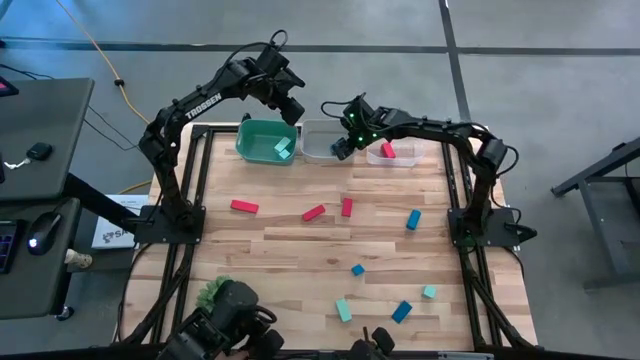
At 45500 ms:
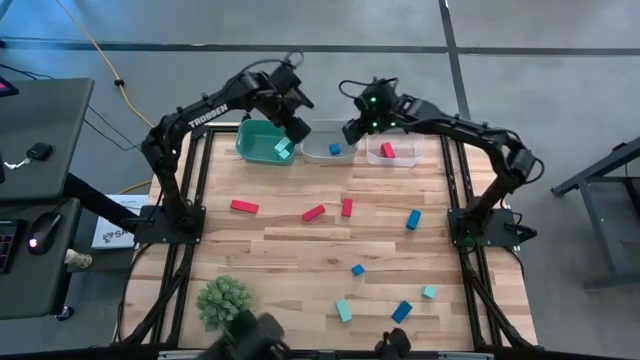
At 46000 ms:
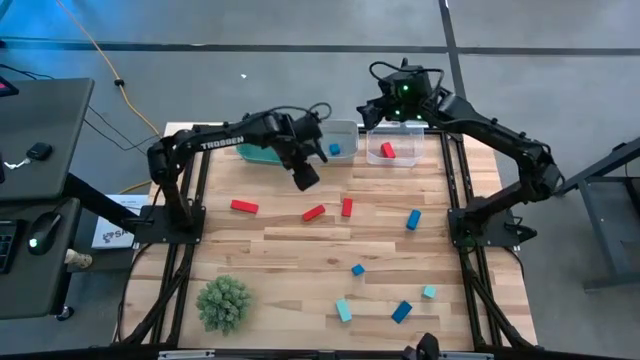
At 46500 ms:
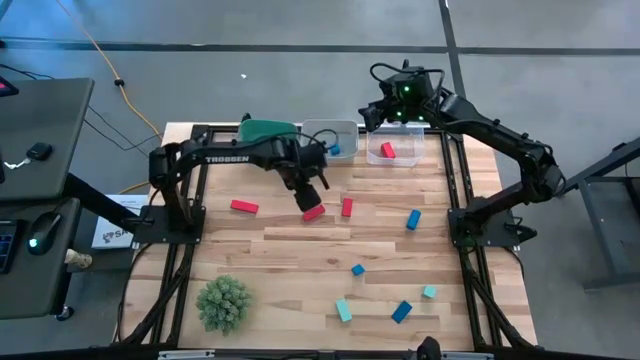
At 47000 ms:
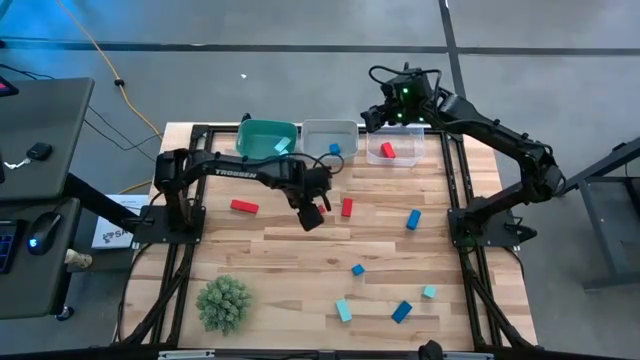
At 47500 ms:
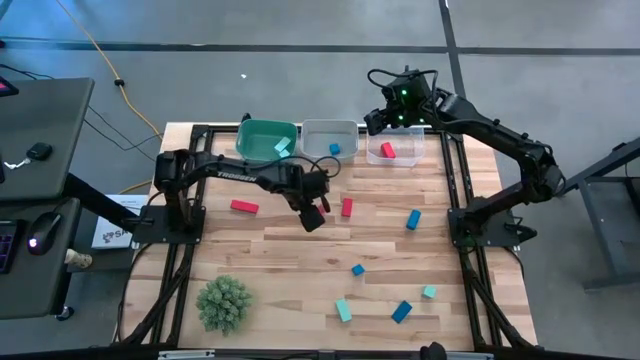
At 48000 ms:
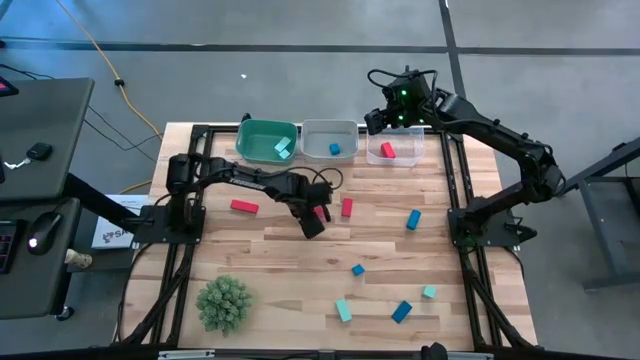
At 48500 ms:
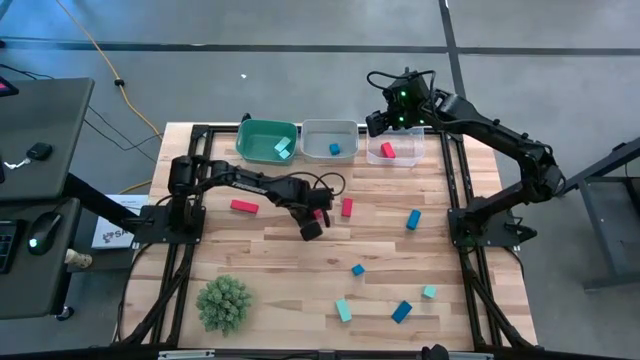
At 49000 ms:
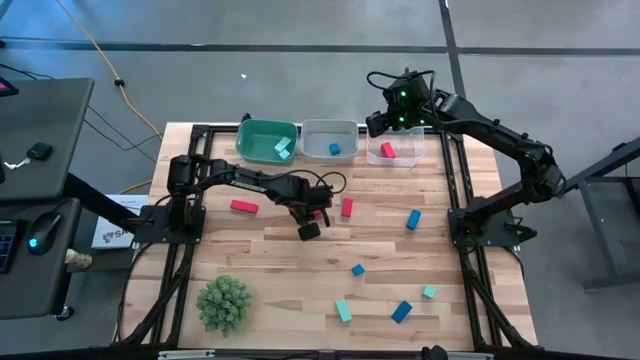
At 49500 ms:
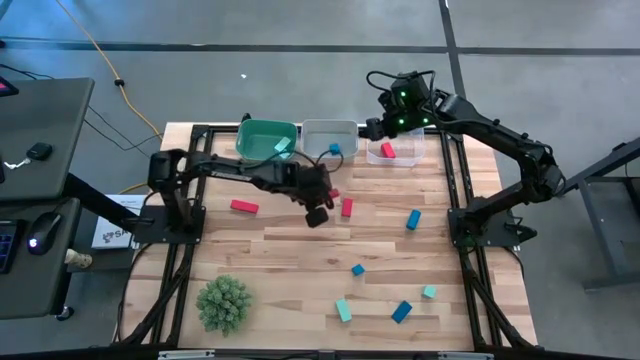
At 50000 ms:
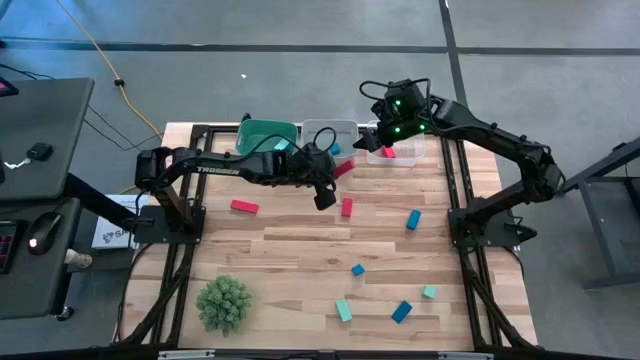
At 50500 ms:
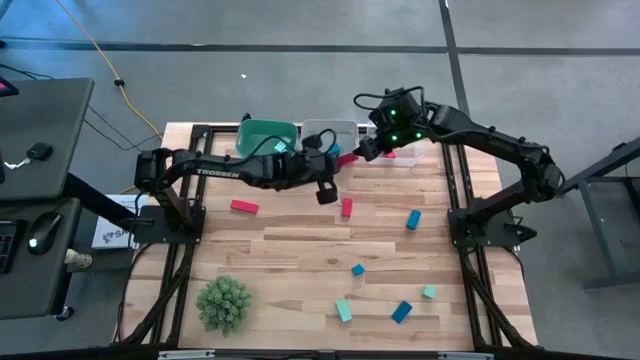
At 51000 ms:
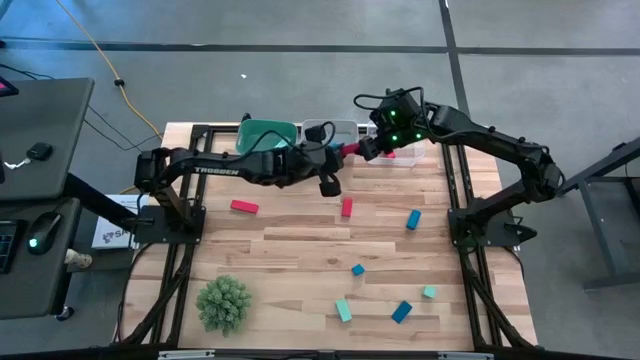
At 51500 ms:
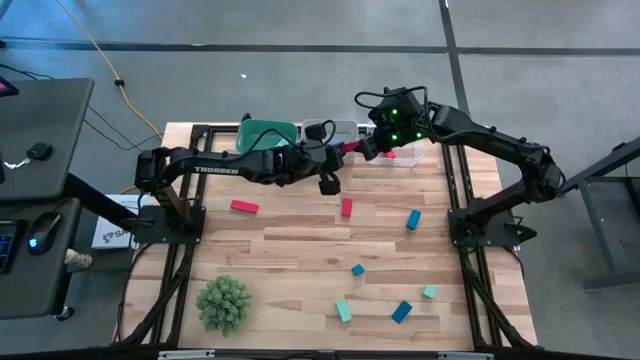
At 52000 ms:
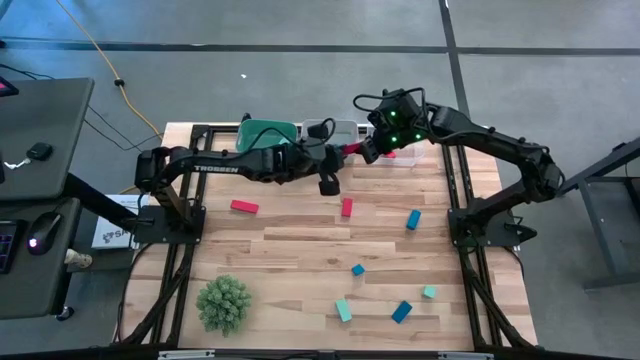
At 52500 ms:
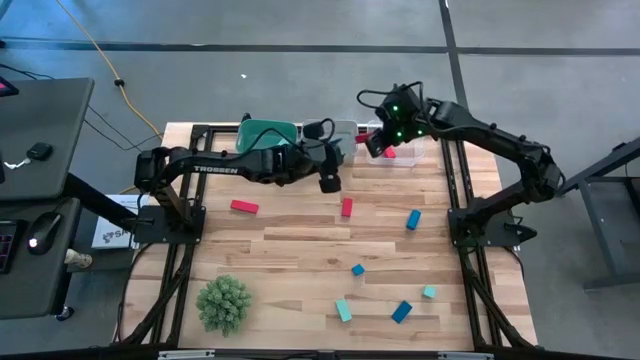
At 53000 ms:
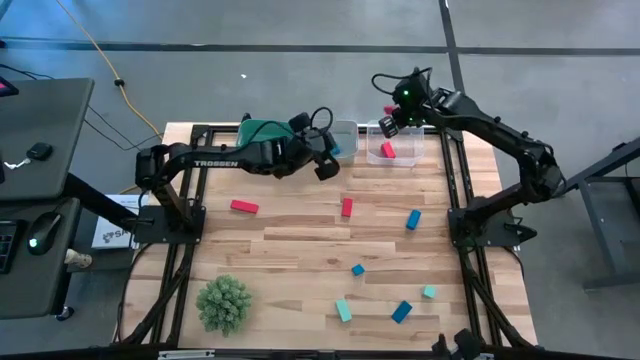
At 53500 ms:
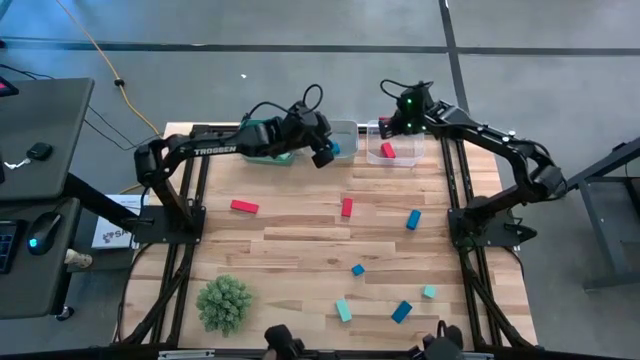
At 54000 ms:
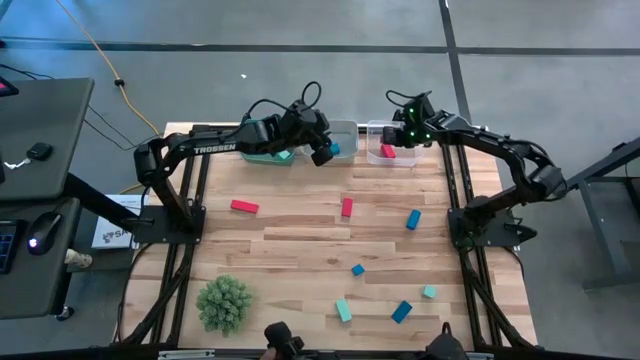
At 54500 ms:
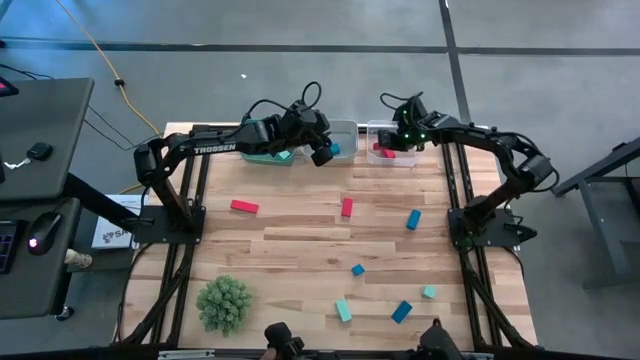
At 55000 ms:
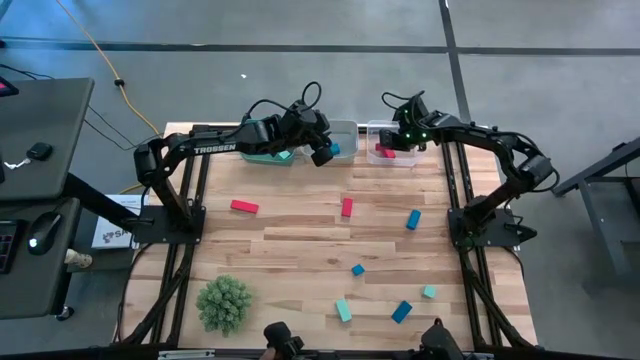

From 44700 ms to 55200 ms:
Task: Sort & place blocks by color
Put the middle red block into the transparent bin

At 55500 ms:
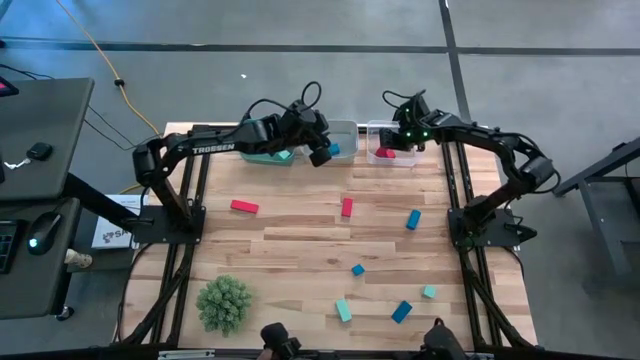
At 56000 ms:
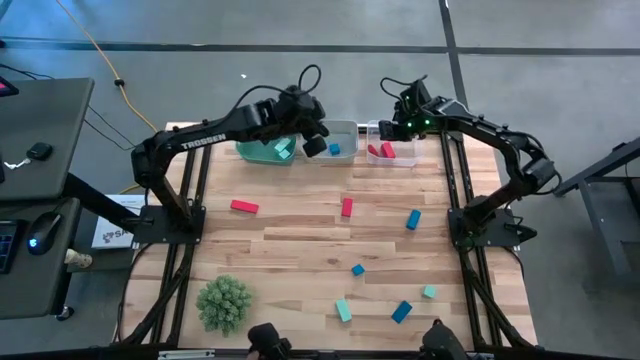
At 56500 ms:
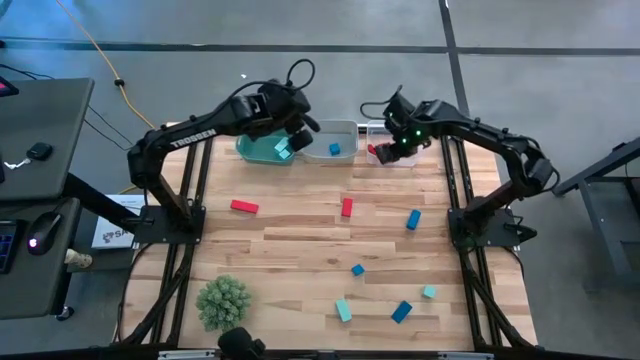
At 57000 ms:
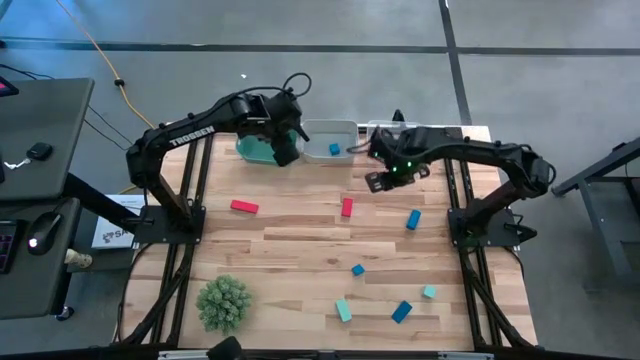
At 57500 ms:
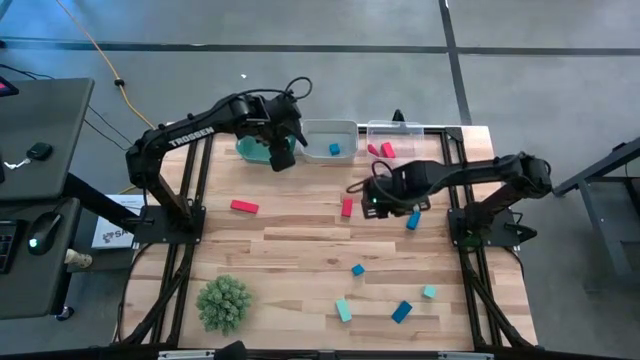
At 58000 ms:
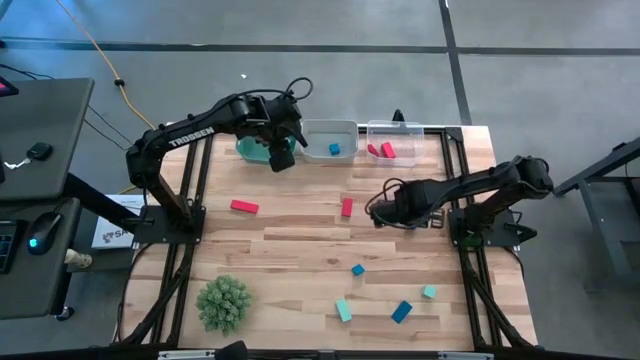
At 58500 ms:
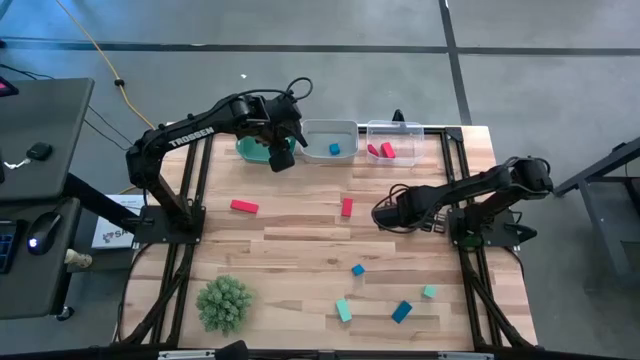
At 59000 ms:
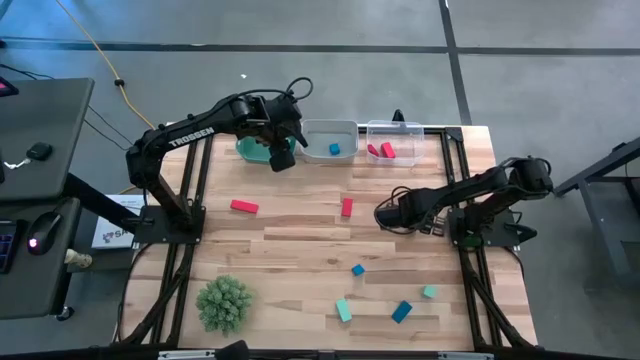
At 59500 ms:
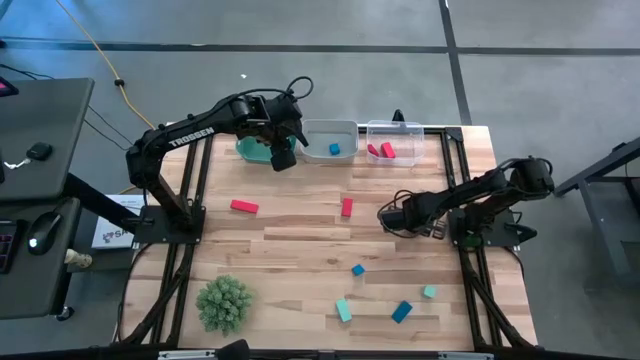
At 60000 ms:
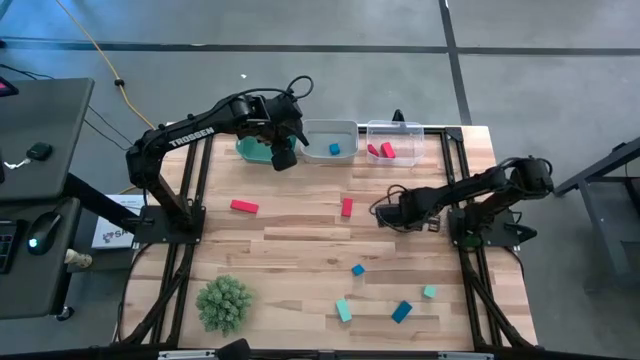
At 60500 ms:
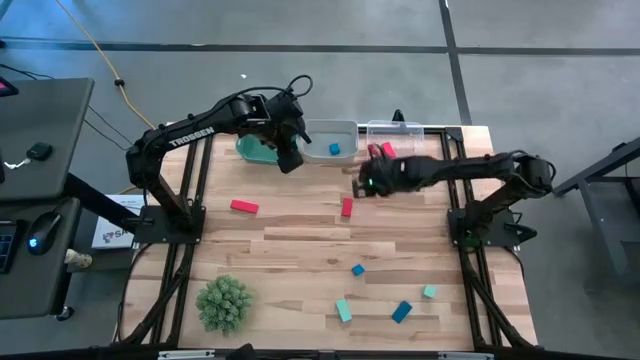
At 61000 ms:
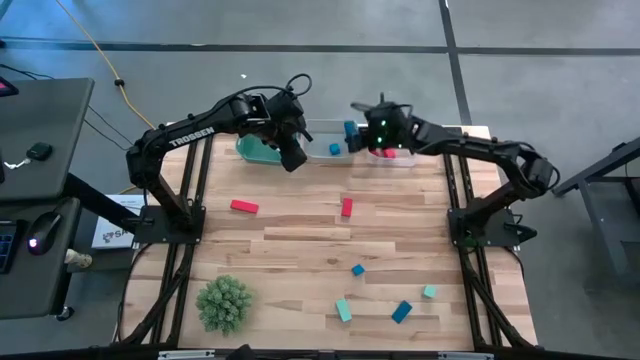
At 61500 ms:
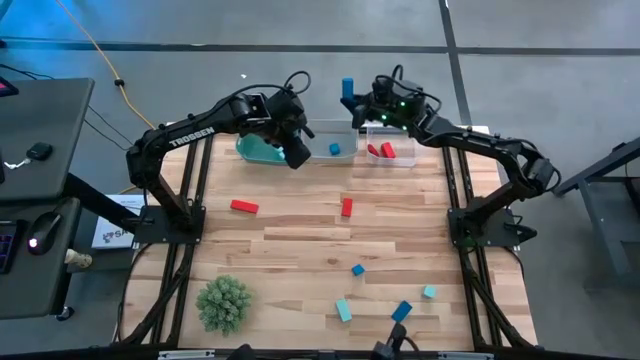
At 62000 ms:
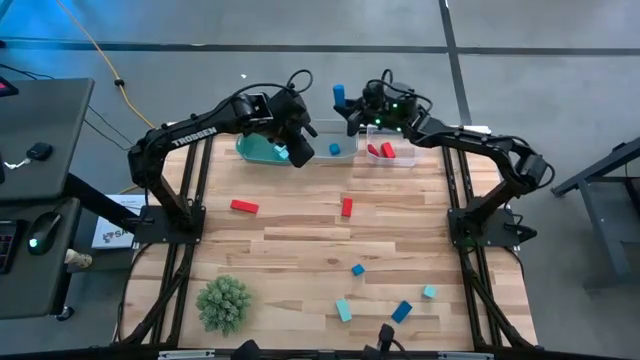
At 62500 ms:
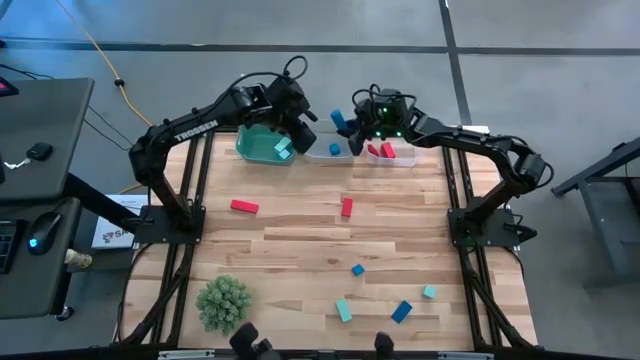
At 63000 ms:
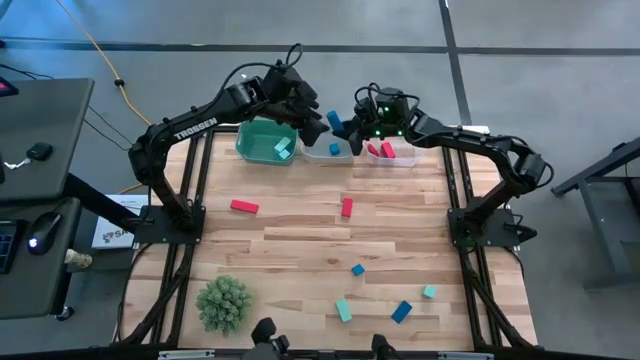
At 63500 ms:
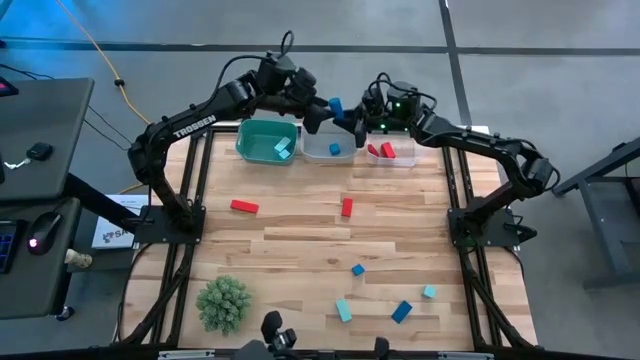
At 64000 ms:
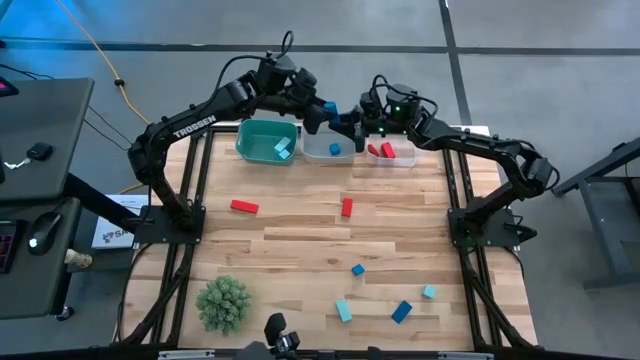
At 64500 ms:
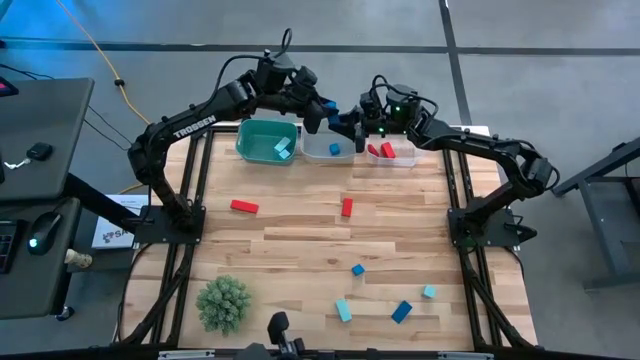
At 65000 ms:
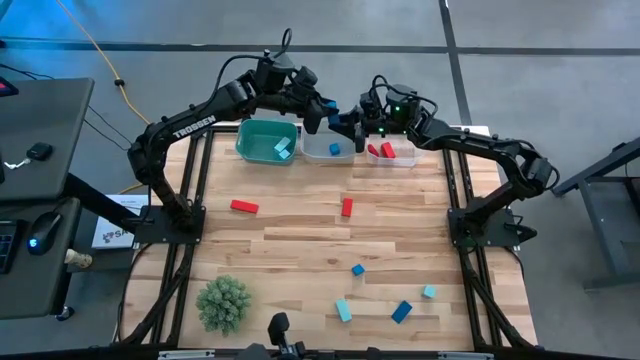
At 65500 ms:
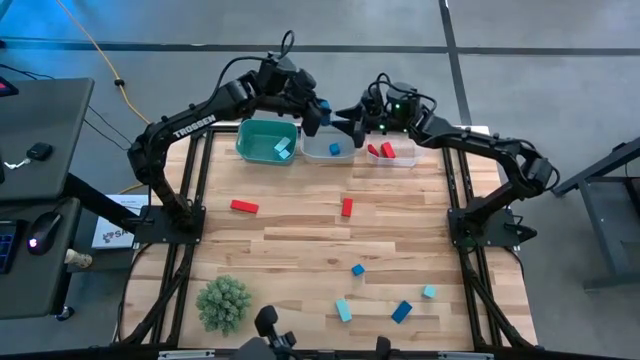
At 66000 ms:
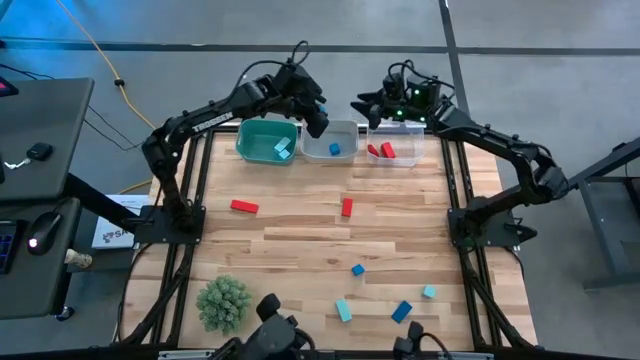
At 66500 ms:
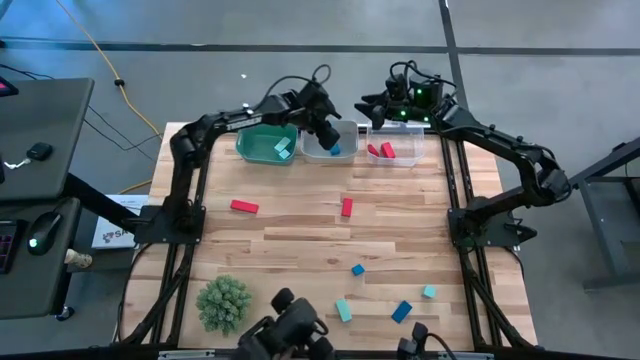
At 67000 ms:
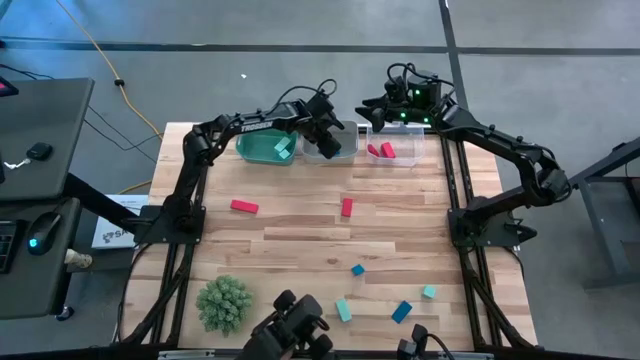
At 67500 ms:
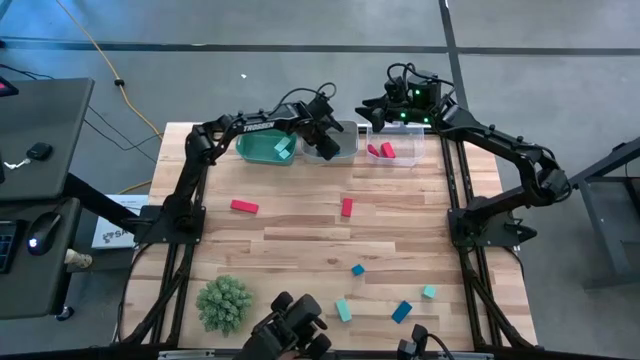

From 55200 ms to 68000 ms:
Put the top blue block into the gray bin
